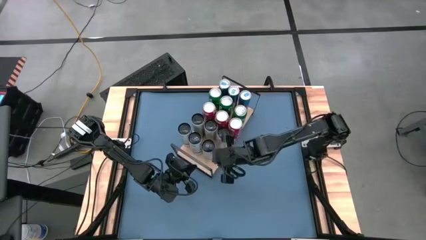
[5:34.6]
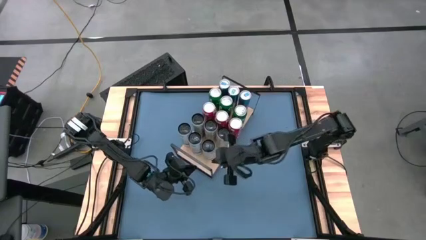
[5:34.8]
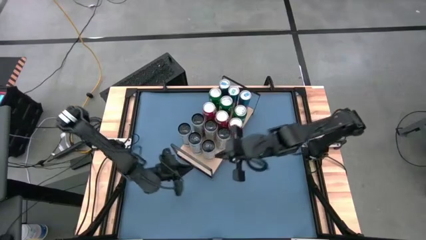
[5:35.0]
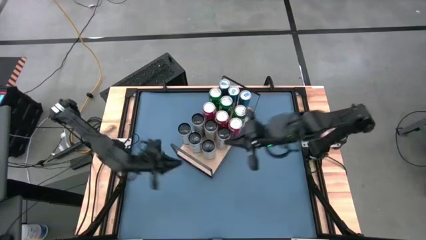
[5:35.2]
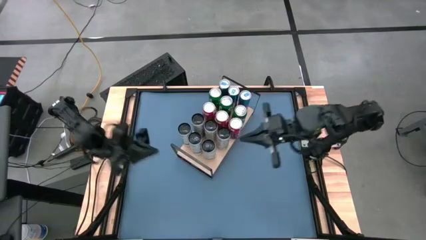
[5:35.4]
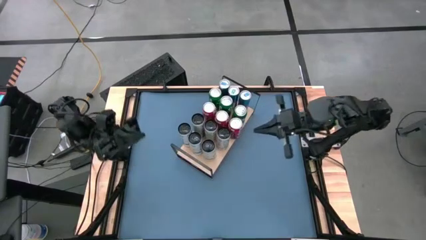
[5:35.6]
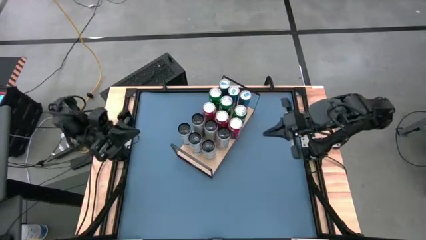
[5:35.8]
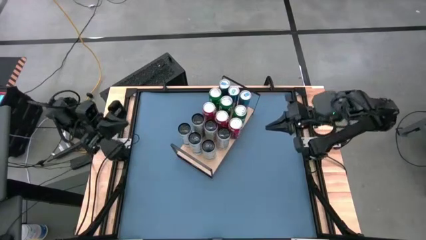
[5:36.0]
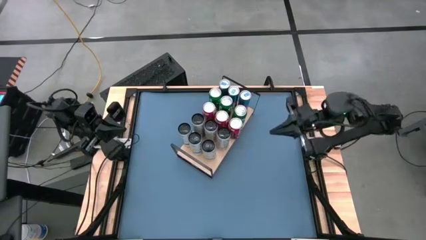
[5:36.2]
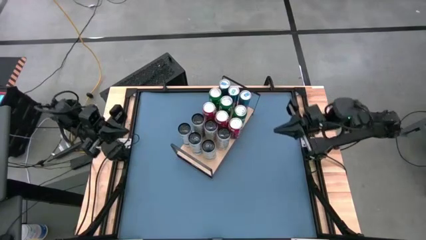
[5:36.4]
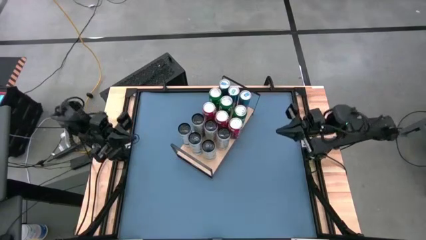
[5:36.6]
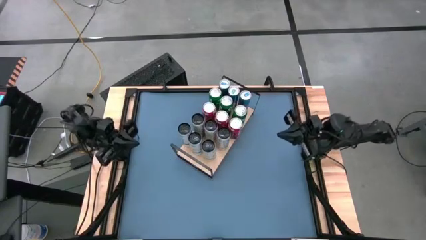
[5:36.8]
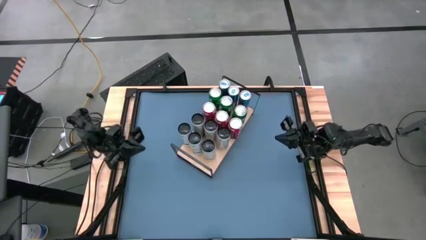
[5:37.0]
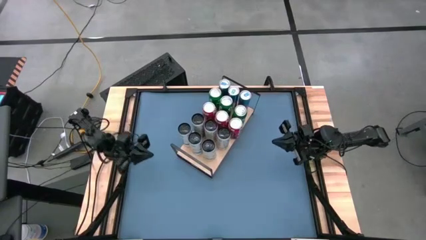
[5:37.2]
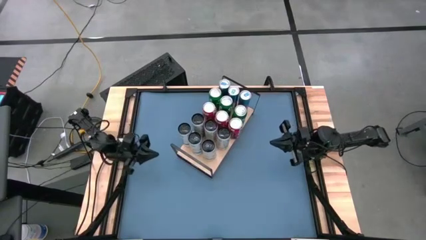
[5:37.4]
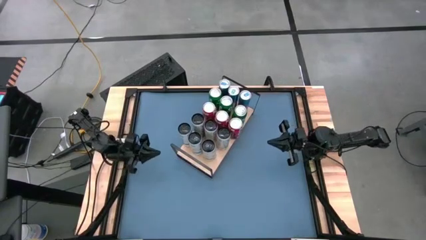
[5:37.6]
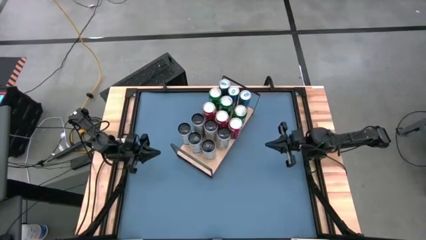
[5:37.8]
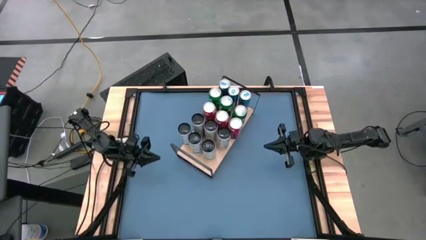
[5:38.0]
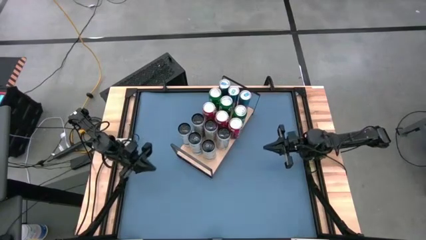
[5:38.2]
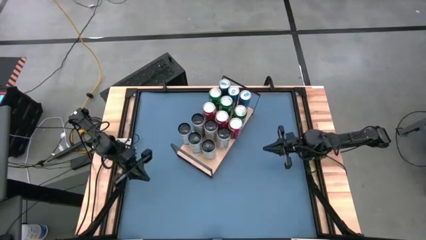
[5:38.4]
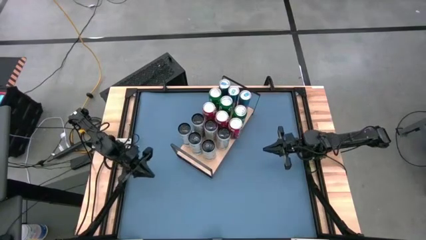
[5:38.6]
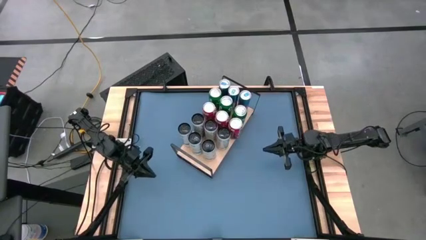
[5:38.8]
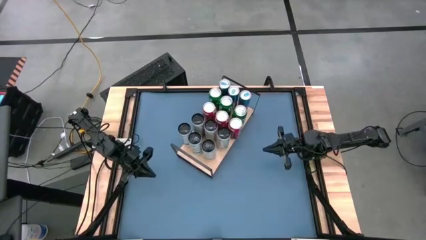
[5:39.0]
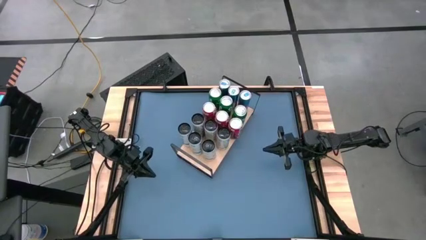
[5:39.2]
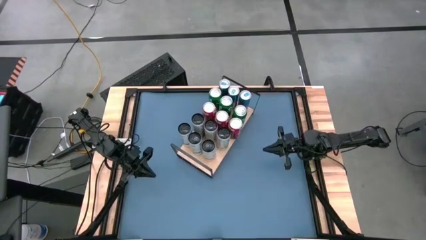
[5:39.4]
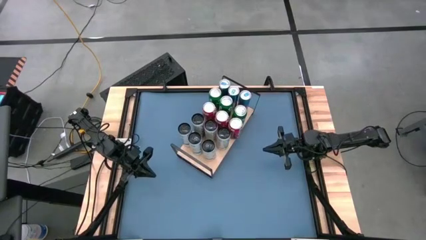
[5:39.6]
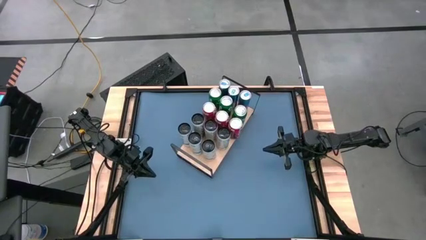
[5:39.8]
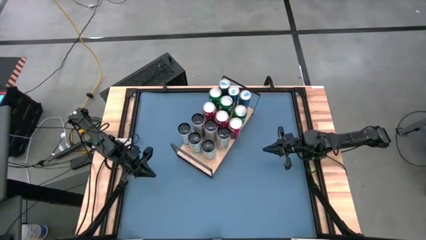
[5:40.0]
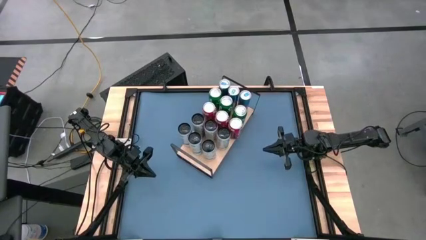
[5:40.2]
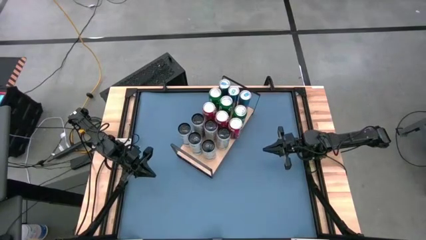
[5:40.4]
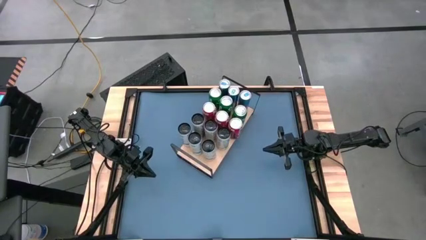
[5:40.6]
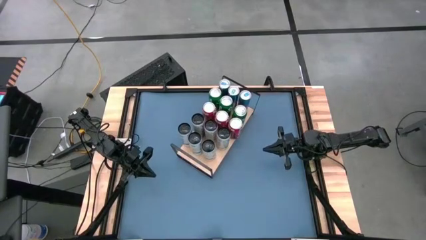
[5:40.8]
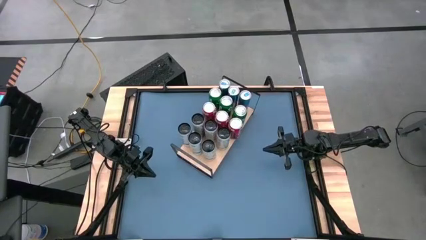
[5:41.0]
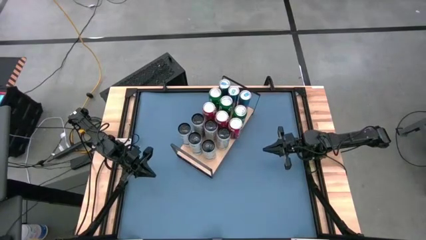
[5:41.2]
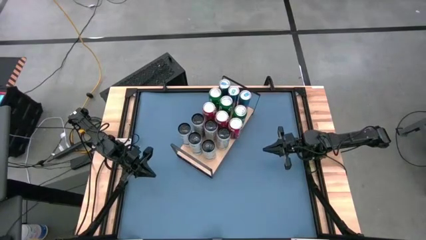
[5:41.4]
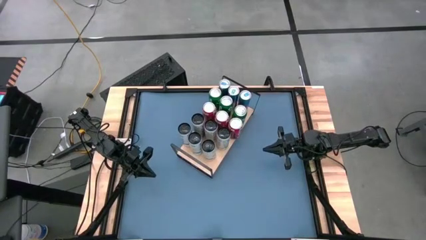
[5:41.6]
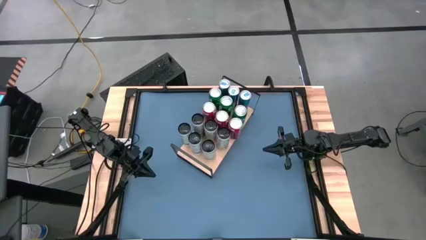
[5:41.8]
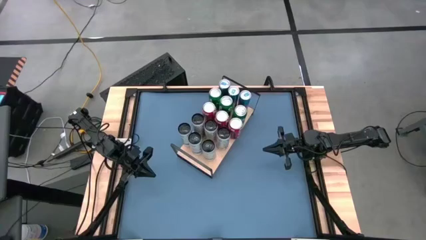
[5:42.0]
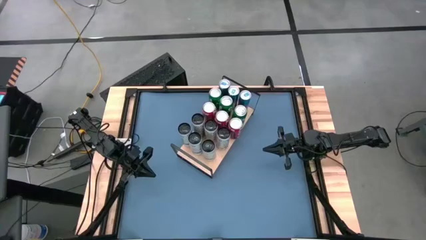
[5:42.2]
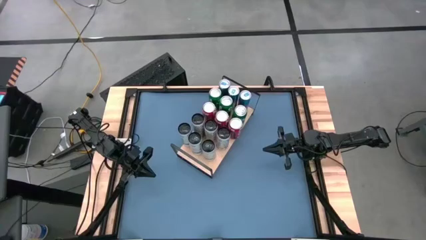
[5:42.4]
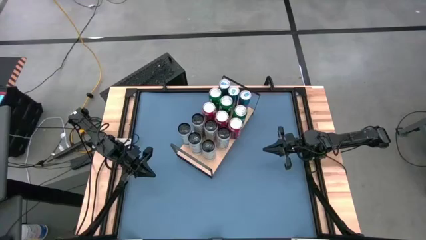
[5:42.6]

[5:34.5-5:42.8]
Task: Place canned beverage on shelf
Return to Home Position

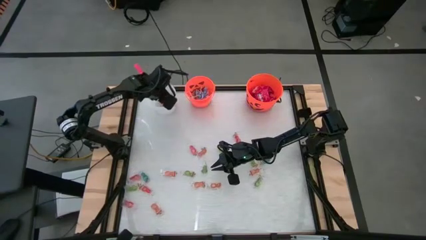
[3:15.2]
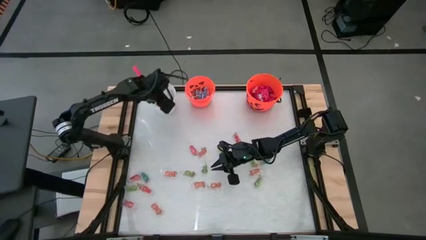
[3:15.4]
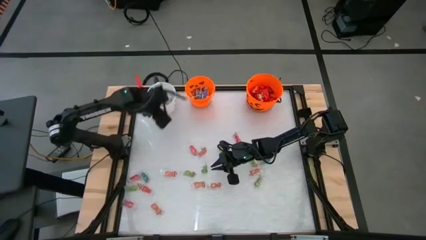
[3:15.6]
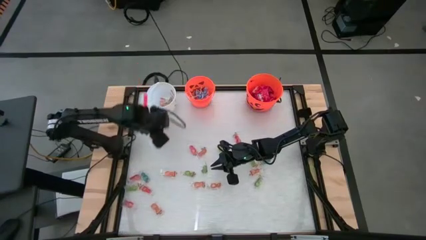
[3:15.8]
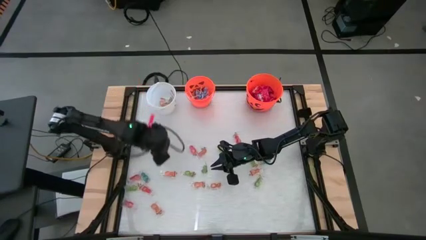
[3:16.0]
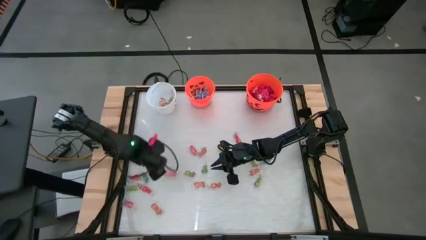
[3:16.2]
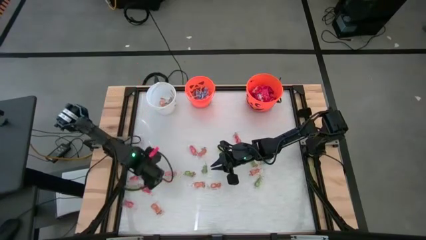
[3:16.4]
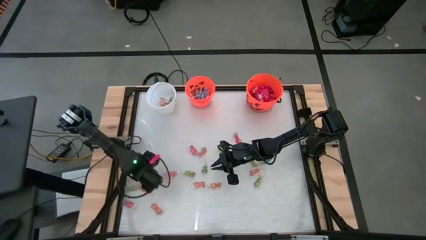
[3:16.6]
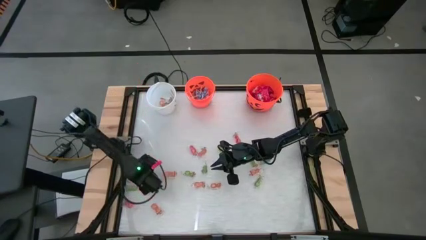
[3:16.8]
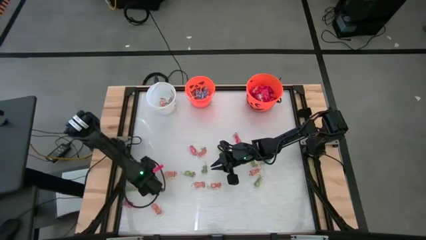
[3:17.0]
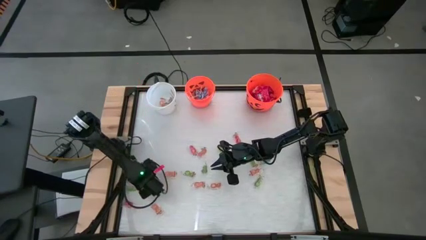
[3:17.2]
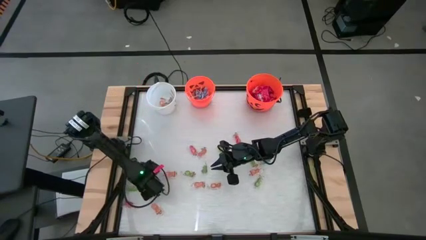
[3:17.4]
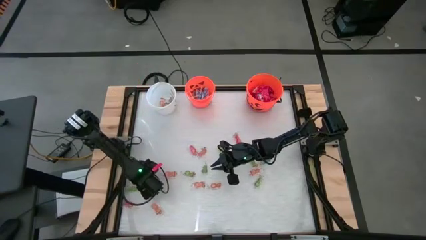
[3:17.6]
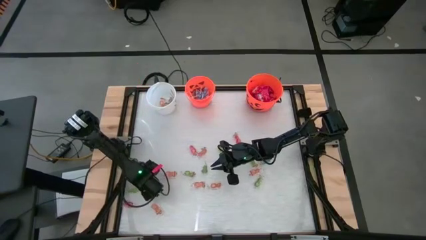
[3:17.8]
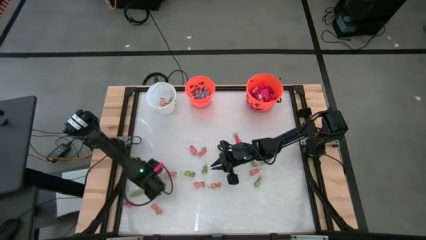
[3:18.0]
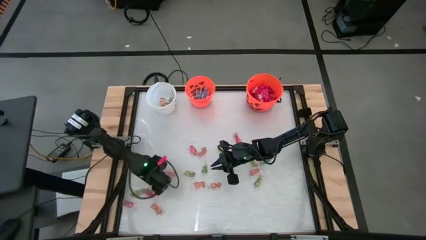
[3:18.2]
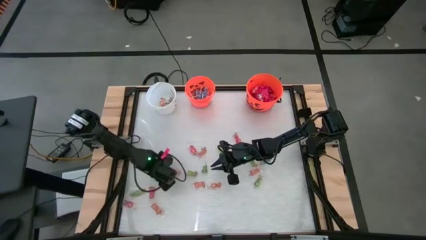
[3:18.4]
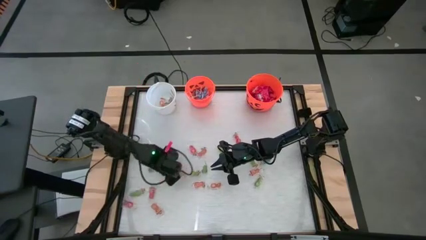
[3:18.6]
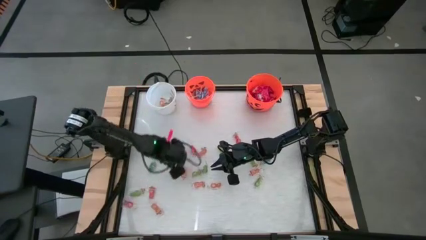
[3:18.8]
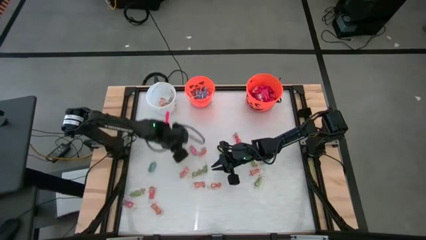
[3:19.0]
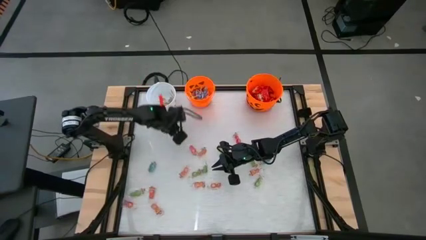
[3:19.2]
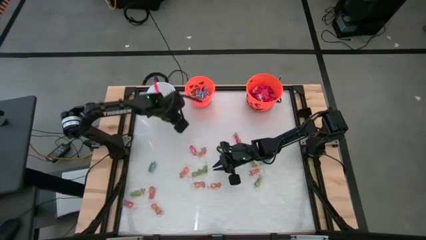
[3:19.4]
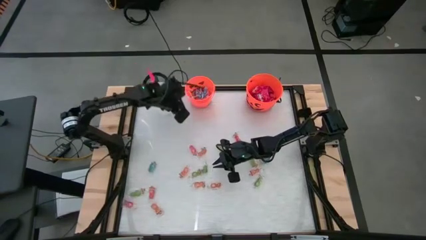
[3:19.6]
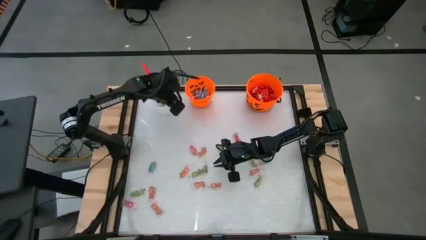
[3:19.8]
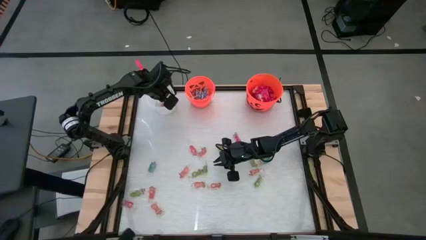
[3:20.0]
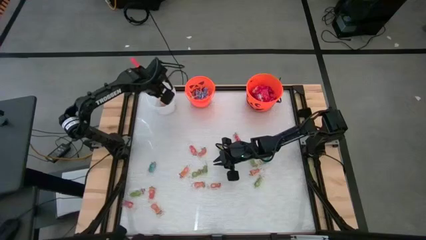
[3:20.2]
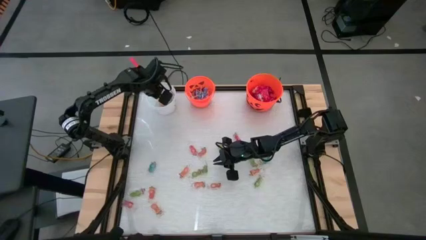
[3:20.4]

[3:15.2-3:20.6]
Task: Sort candy by brand, put in halloween buckets
Put the orange gummy into the white bucket

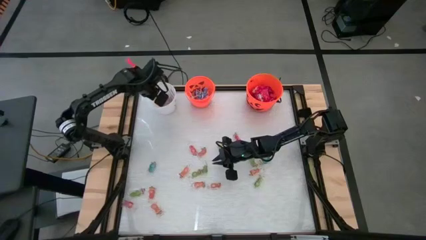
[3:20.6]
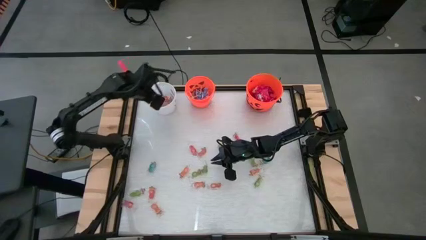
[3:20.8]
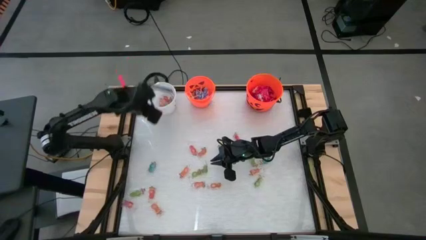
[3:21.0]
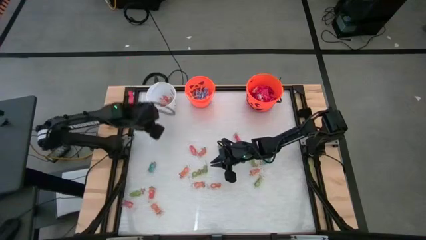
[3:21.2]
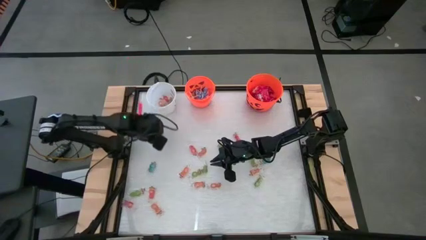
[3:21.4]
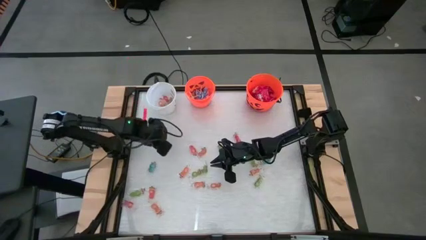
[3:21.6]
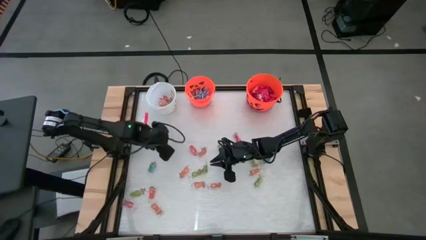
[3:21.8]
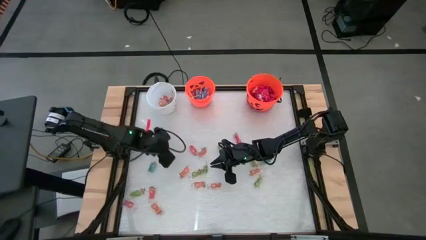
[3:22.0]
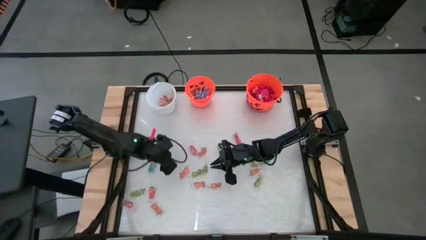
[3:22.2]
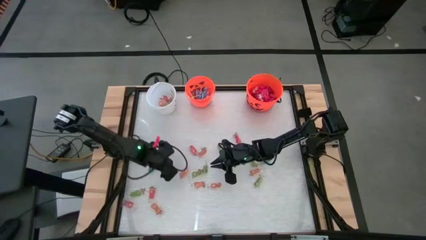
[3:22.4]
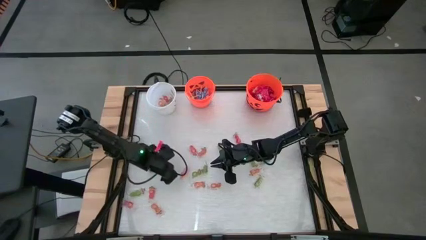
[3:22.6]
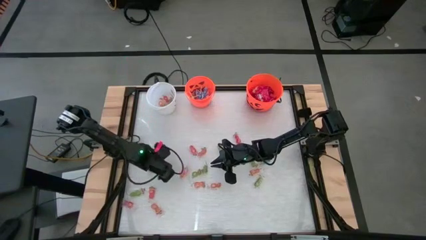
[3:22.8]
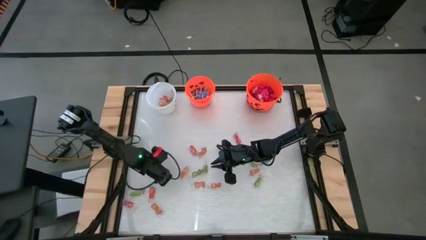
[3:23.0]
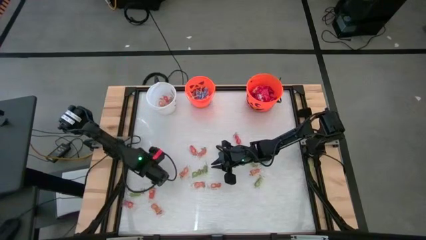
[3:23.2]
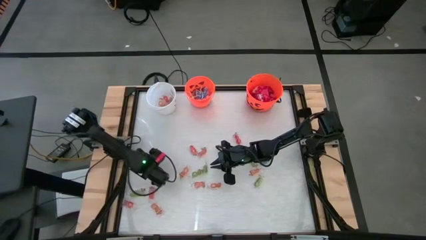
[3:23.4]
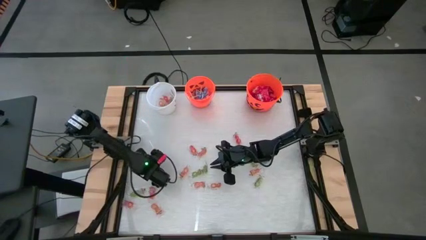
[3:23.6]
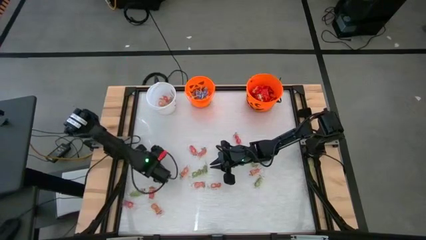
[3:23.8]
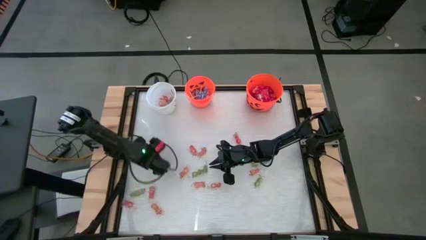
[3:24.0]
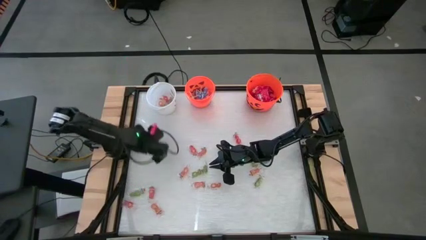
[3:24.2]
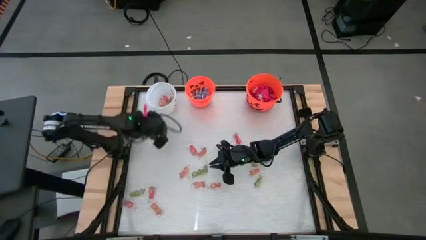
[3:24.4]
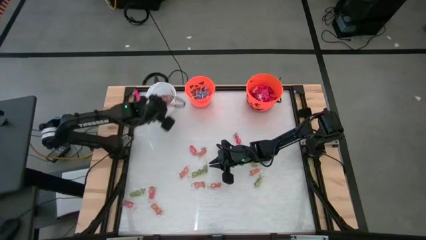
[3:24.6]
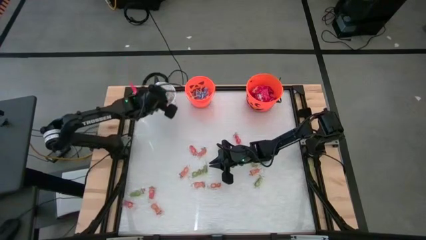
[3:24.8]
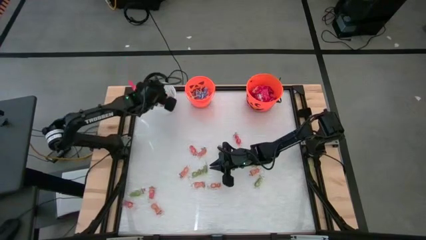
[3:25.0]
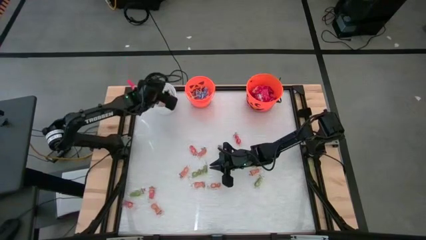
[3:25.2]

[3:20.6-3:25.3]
Put the blue gummy into the white bucket
